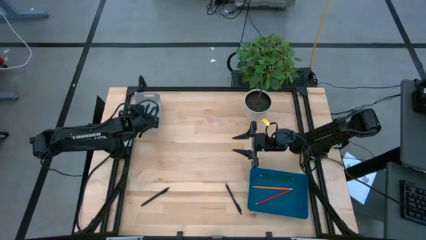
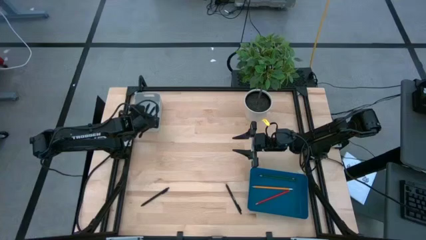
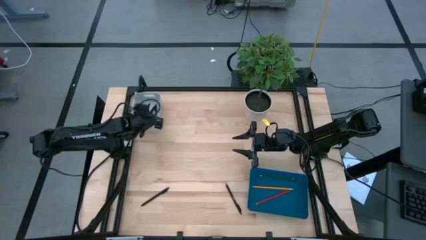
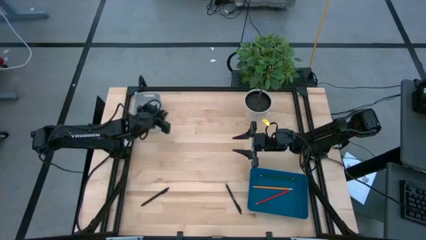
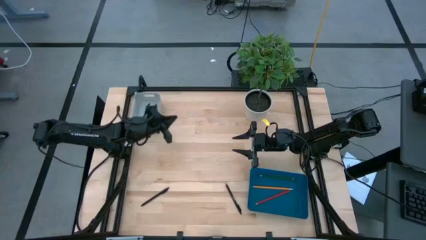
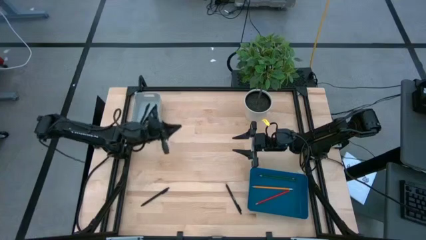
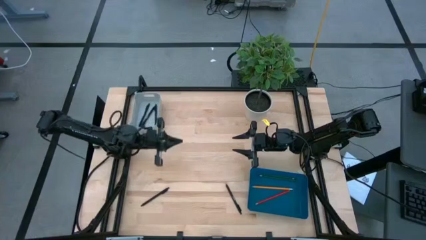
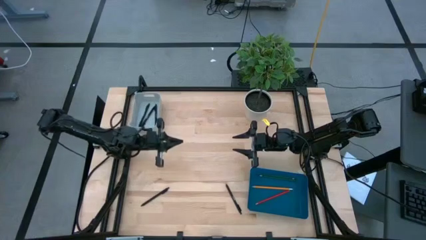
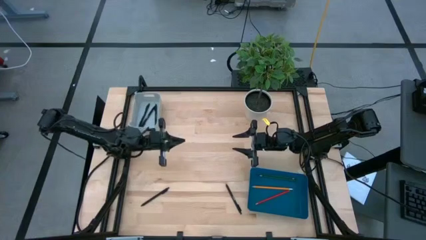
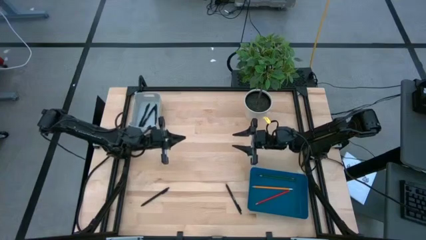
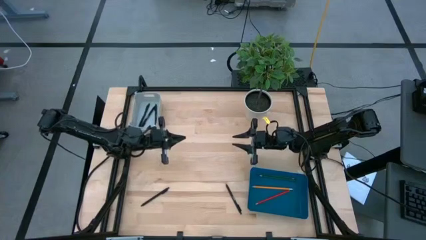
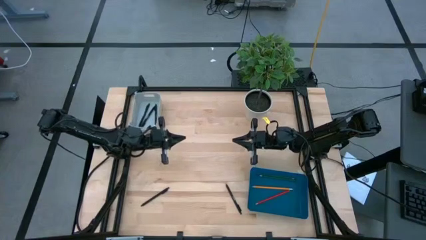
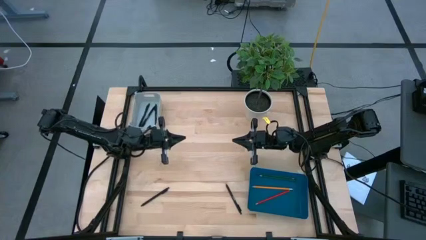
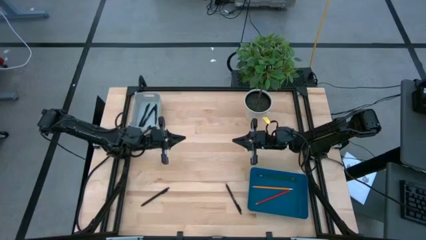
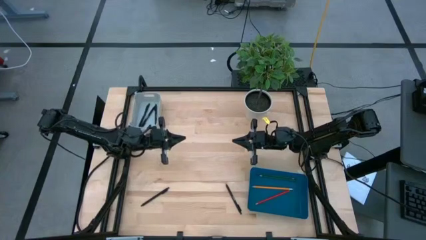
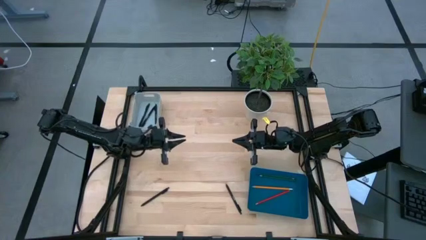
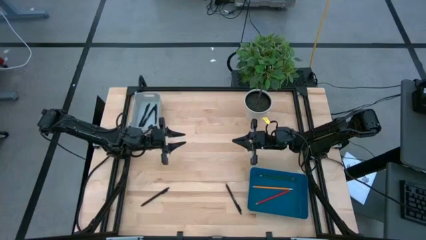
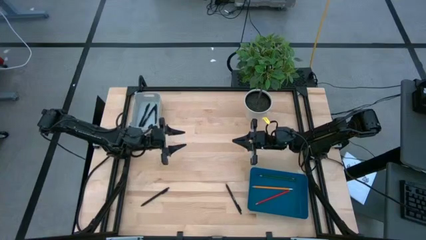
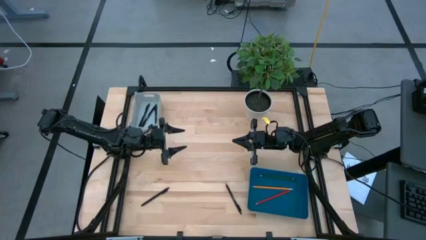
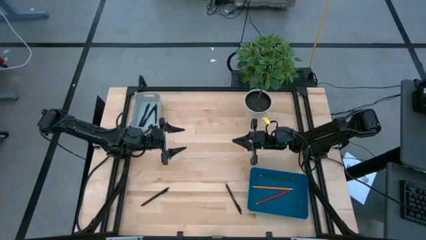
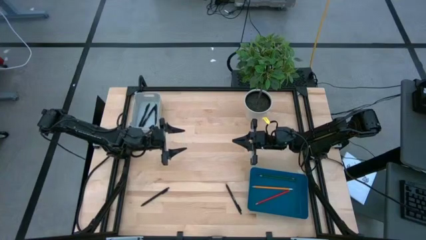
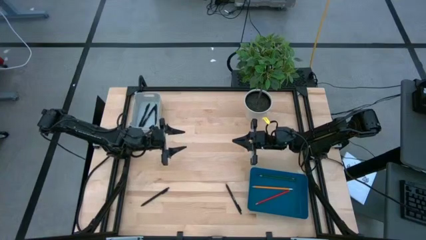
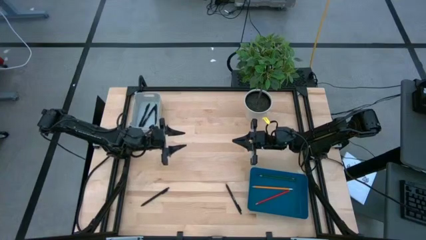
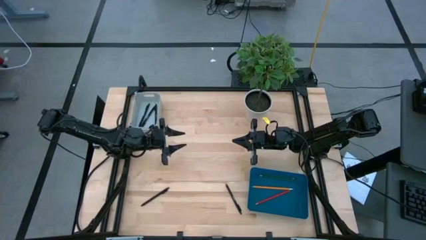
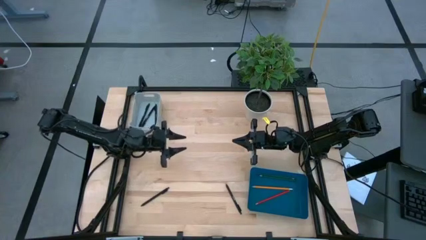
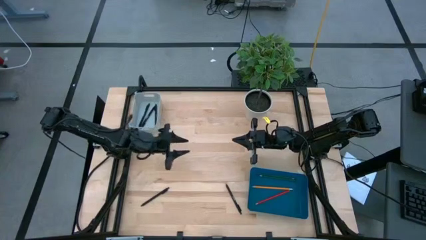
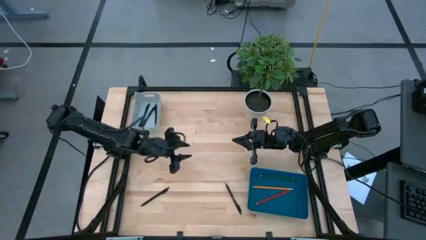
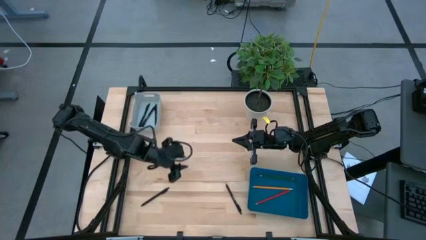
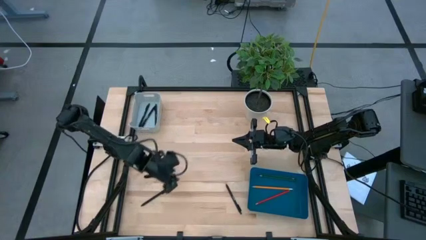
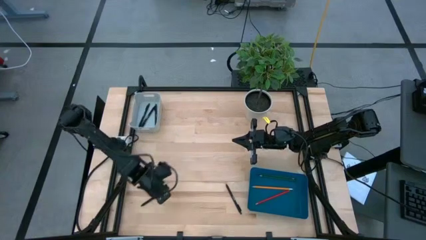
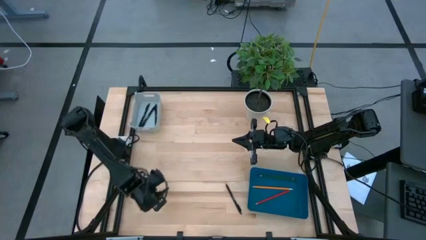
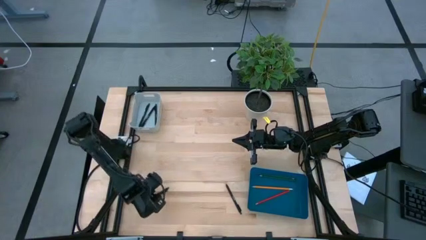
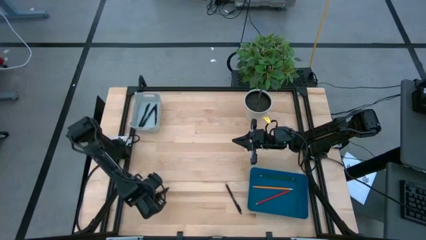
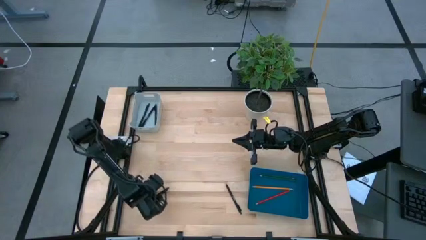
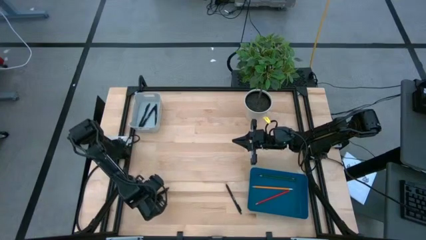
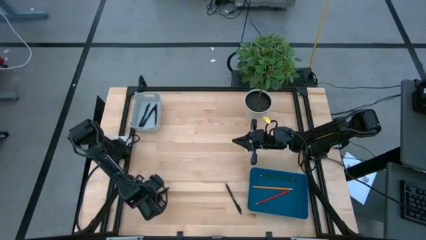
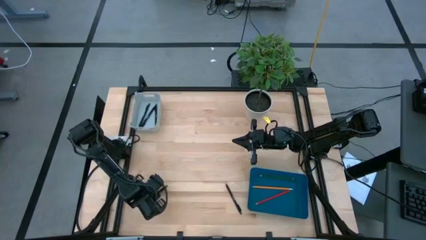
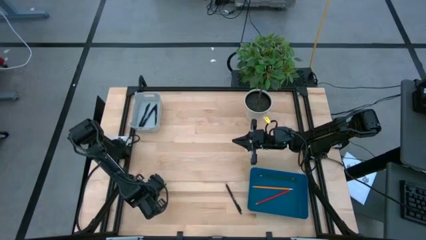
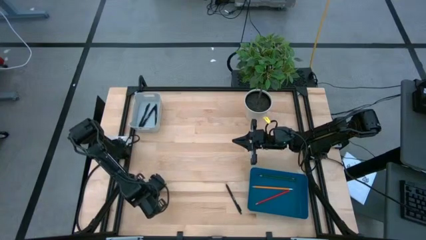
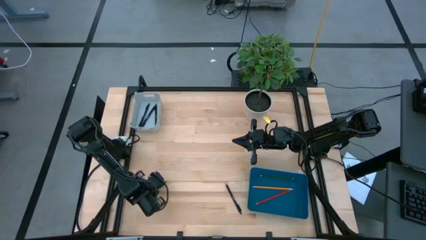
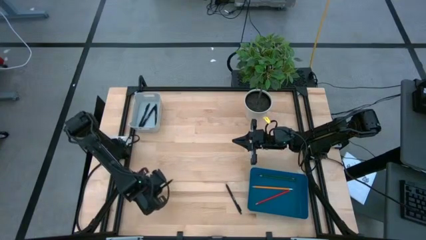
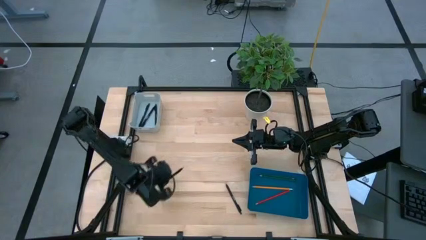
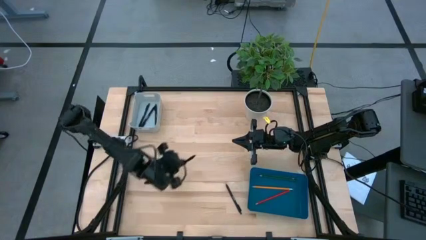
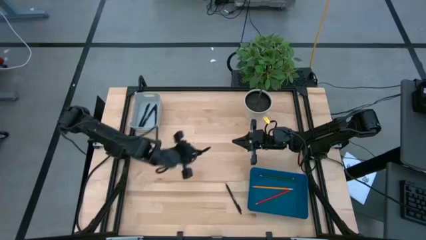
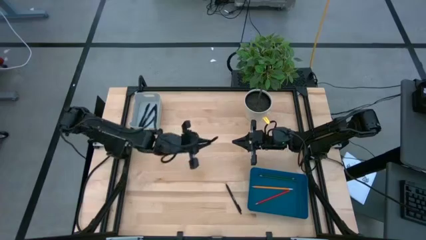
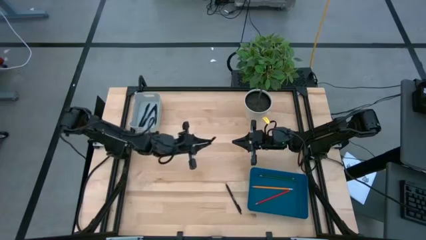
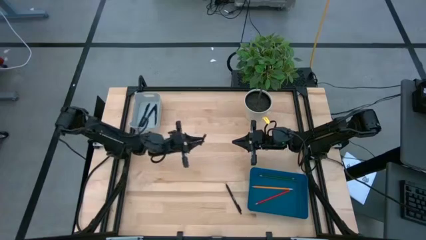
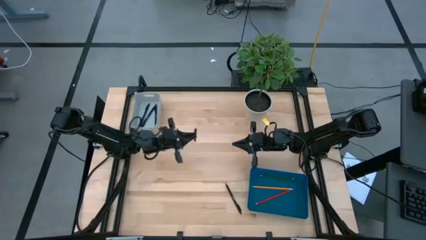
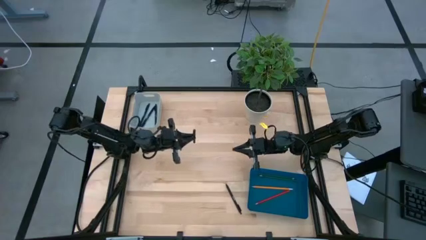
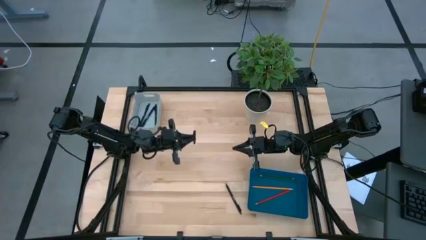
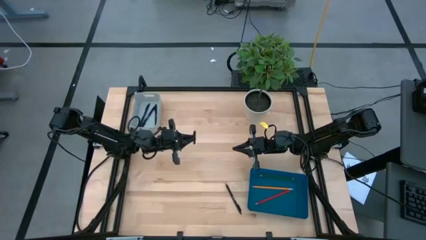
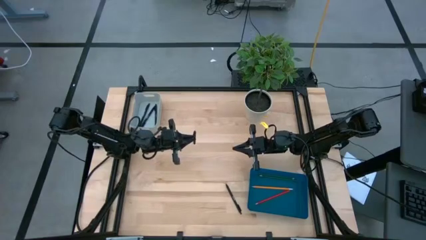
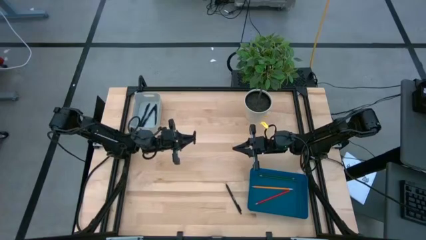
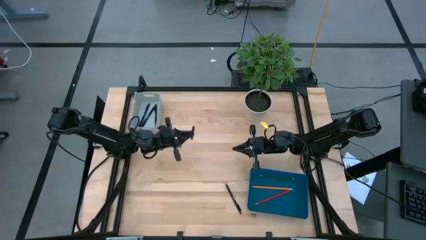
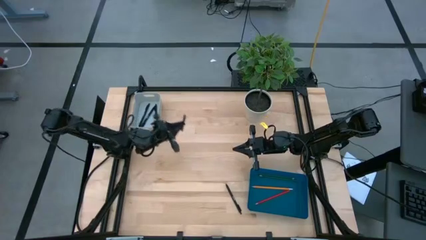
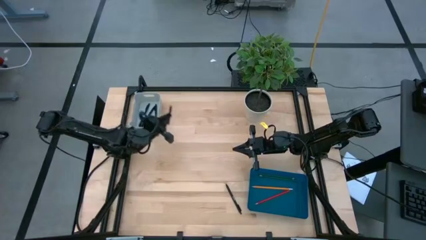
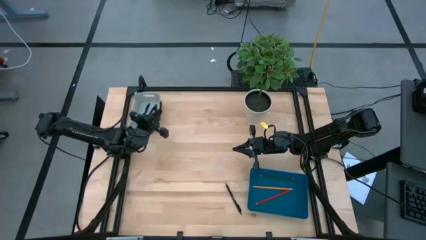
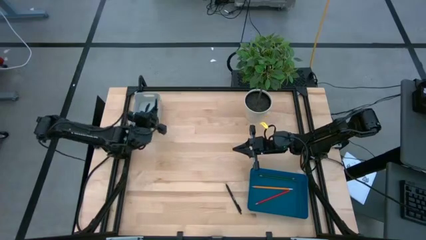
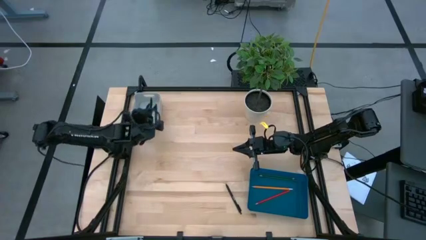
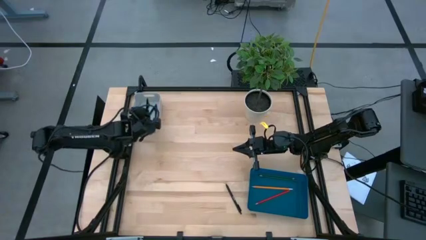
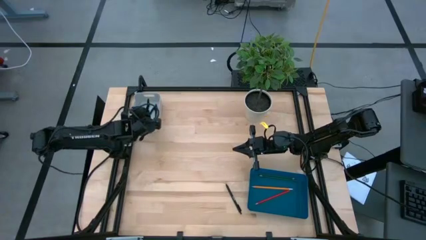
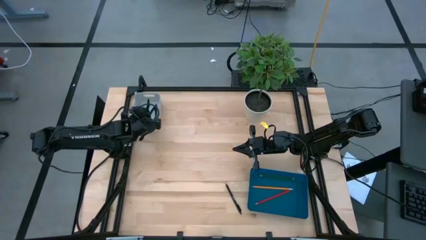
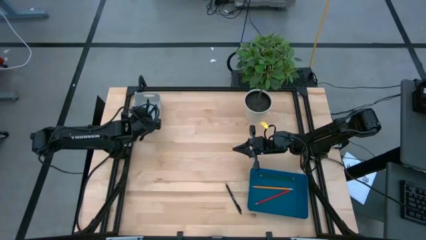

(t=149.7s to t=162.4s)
Task: Sort pens & pencils
Put the black pen into the white bin
